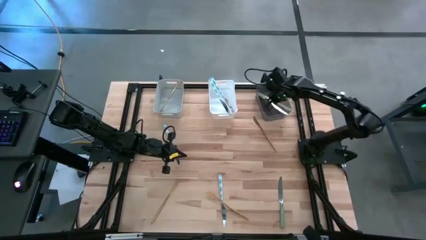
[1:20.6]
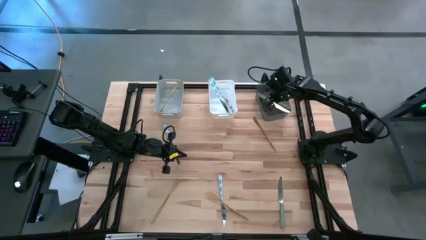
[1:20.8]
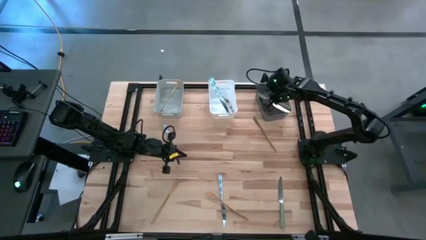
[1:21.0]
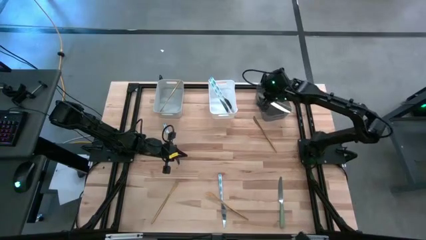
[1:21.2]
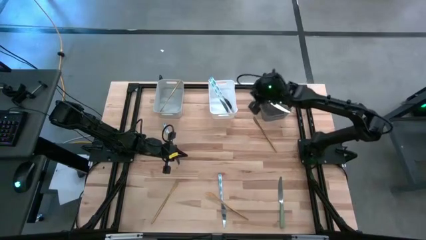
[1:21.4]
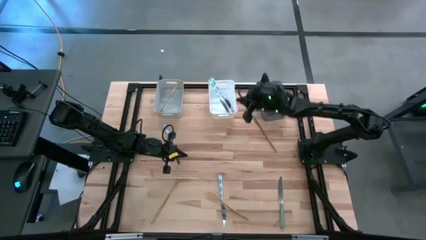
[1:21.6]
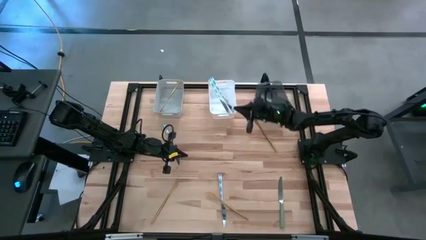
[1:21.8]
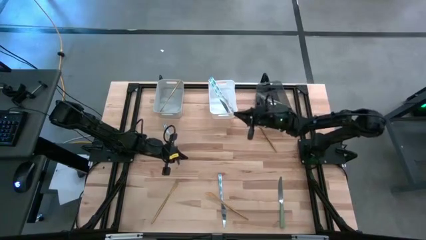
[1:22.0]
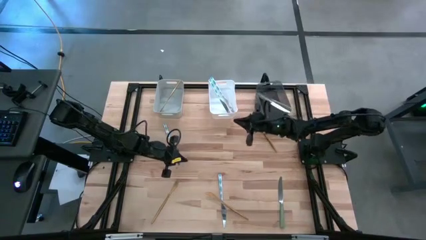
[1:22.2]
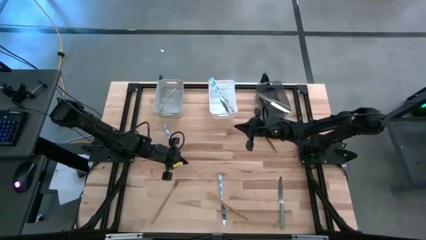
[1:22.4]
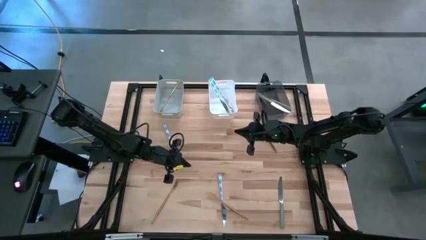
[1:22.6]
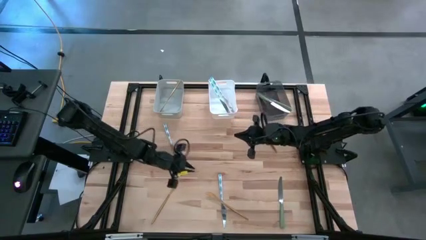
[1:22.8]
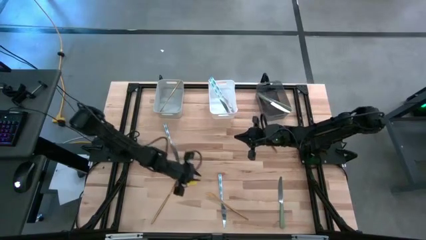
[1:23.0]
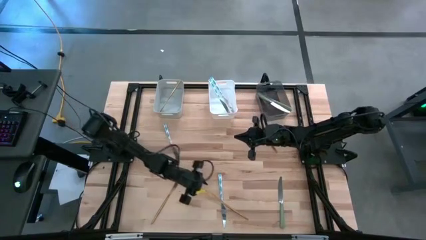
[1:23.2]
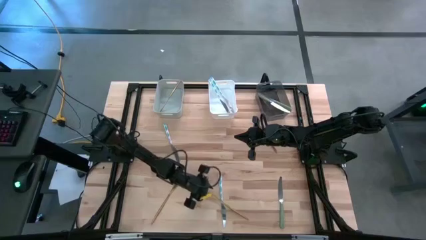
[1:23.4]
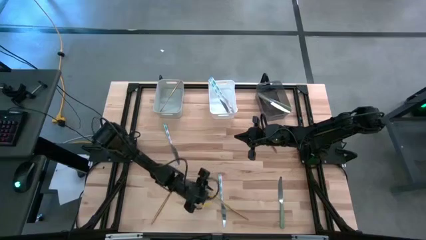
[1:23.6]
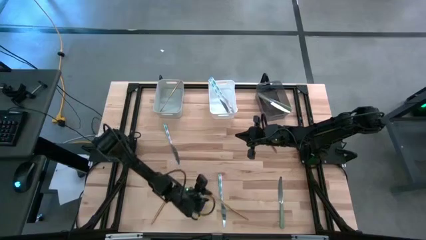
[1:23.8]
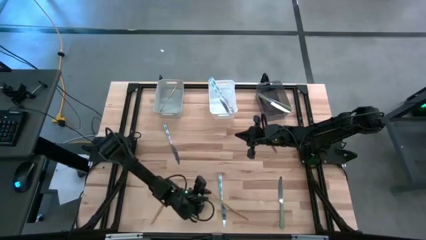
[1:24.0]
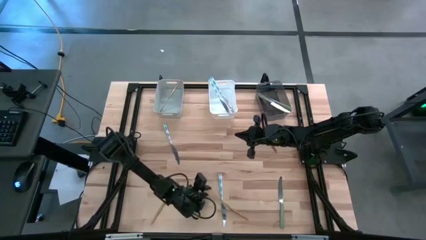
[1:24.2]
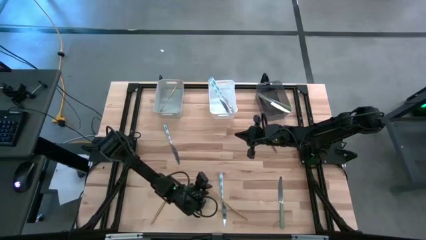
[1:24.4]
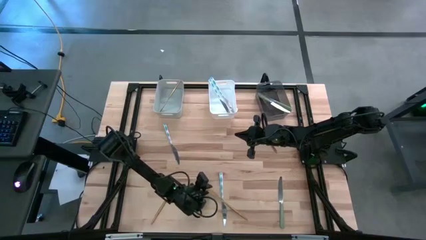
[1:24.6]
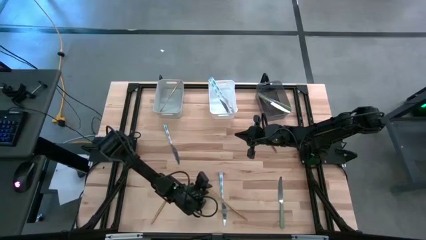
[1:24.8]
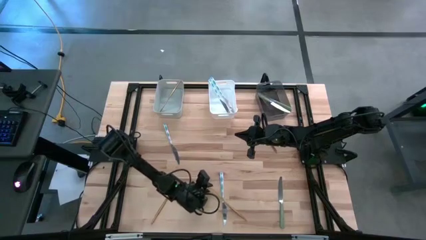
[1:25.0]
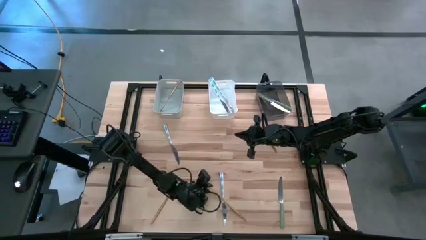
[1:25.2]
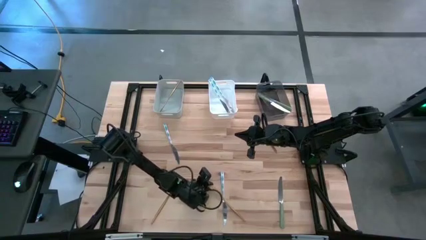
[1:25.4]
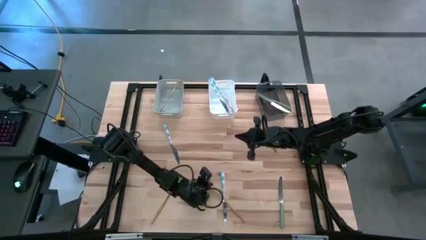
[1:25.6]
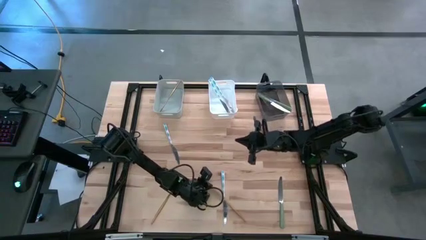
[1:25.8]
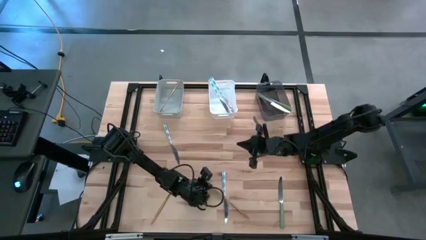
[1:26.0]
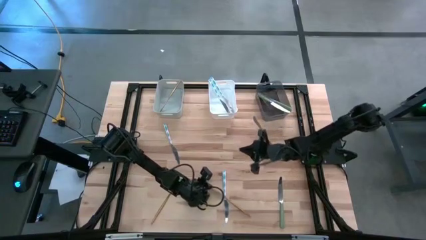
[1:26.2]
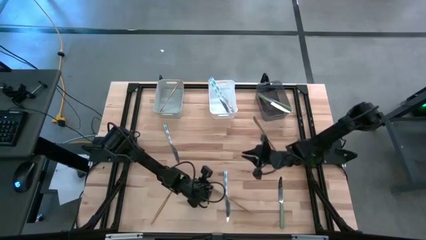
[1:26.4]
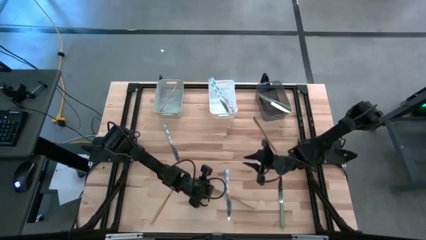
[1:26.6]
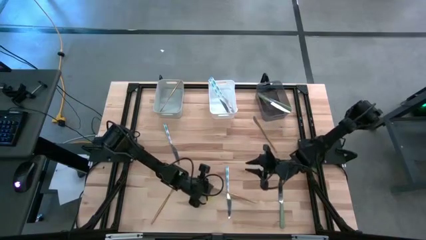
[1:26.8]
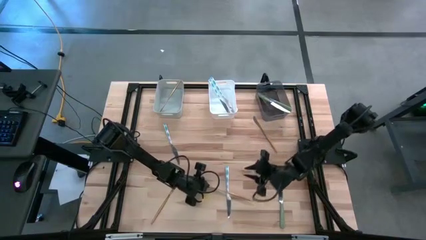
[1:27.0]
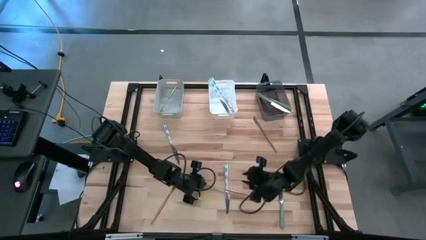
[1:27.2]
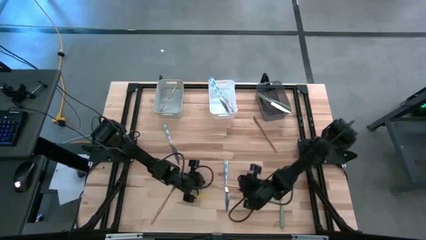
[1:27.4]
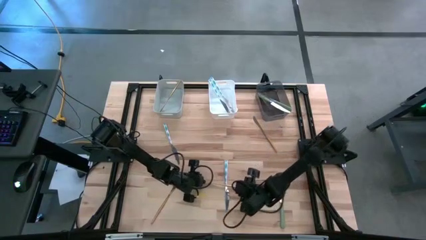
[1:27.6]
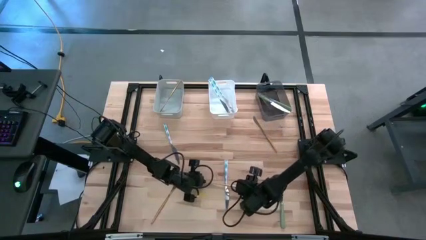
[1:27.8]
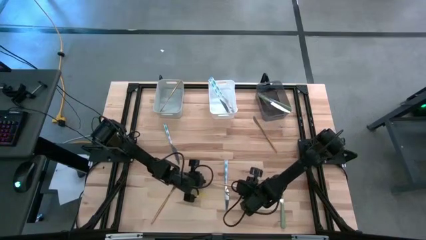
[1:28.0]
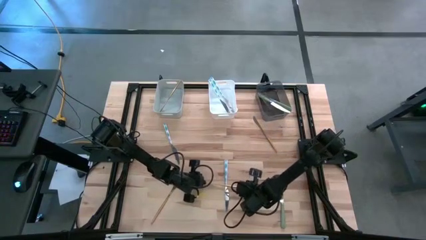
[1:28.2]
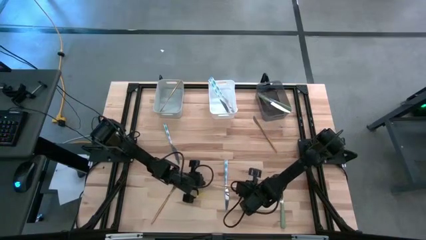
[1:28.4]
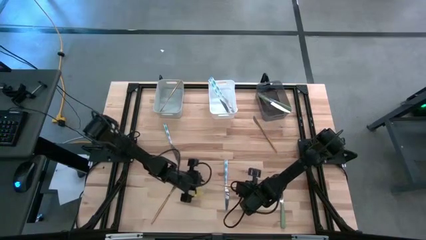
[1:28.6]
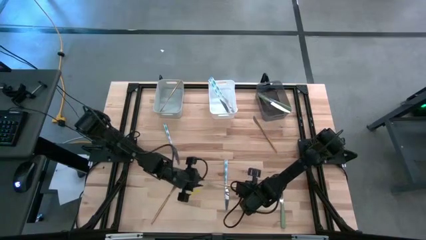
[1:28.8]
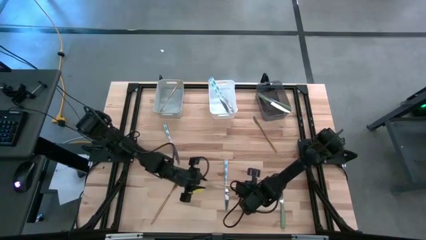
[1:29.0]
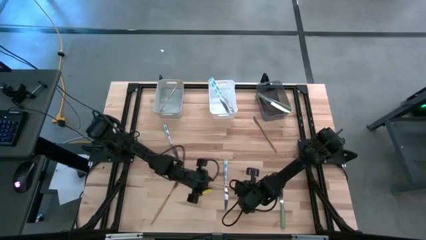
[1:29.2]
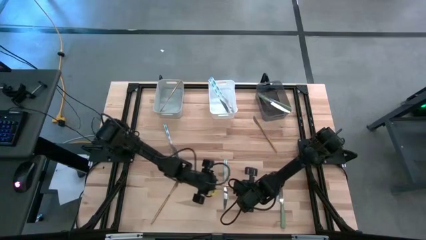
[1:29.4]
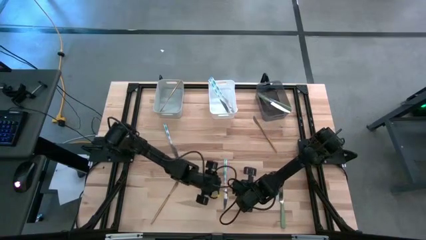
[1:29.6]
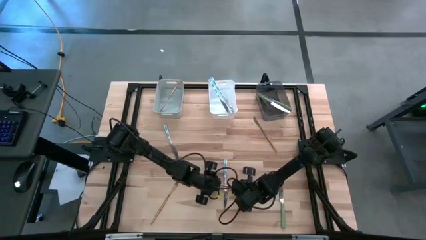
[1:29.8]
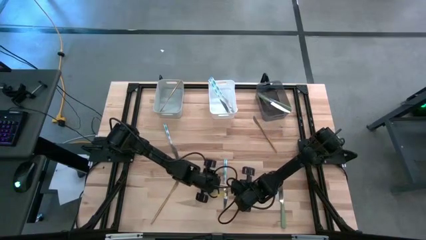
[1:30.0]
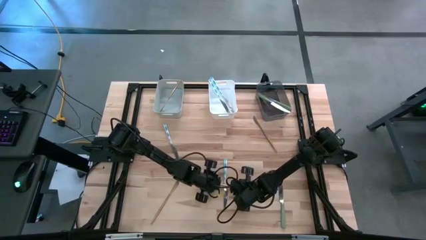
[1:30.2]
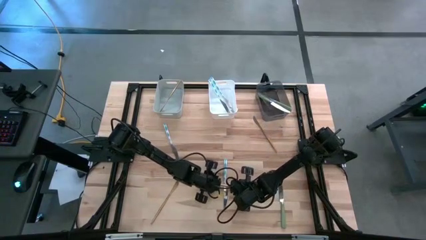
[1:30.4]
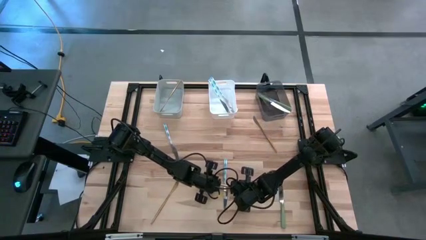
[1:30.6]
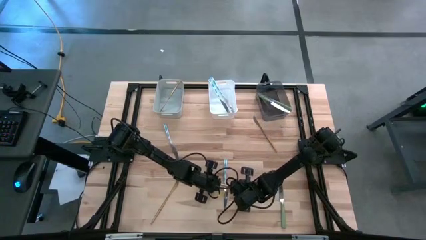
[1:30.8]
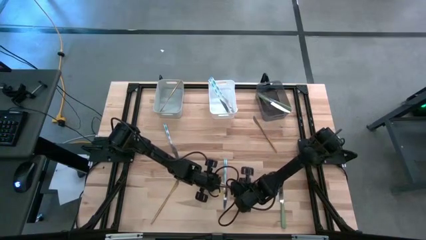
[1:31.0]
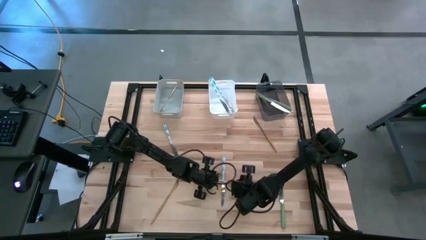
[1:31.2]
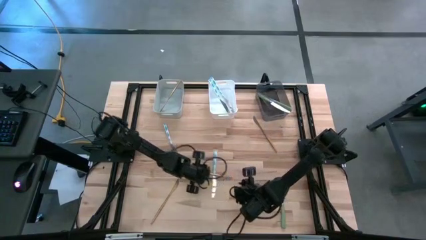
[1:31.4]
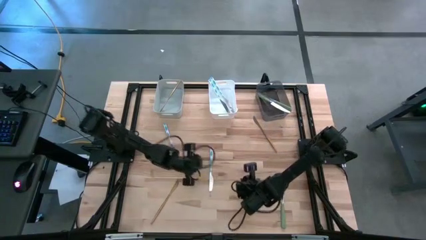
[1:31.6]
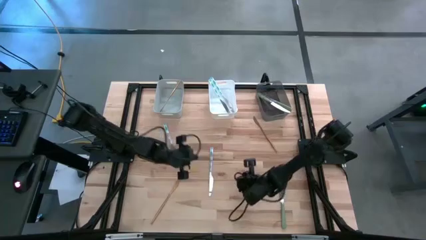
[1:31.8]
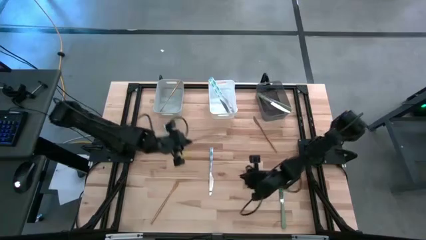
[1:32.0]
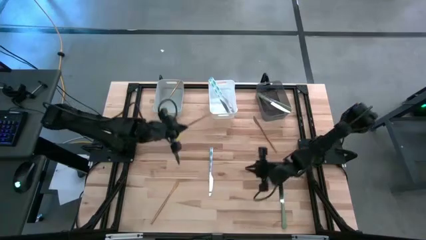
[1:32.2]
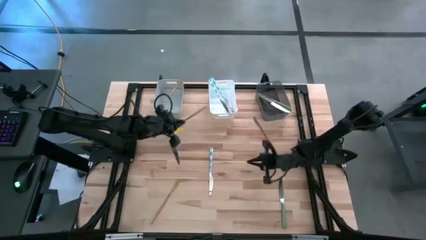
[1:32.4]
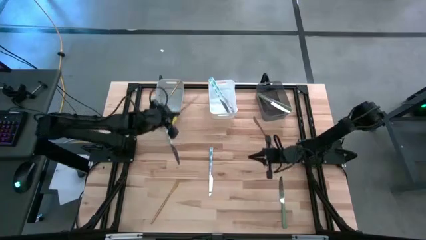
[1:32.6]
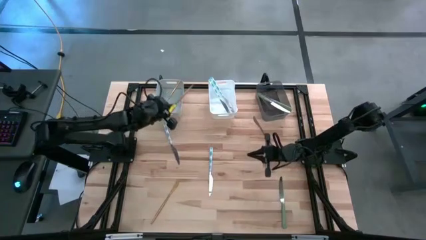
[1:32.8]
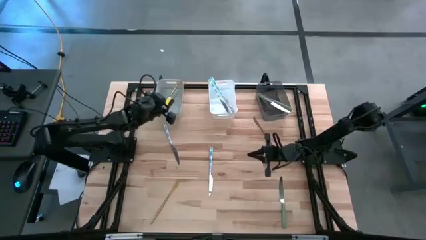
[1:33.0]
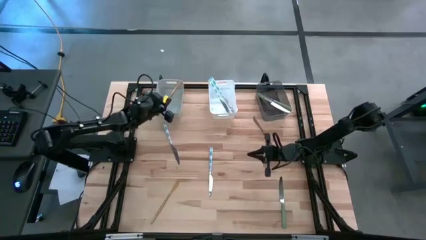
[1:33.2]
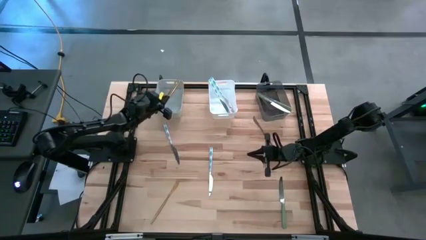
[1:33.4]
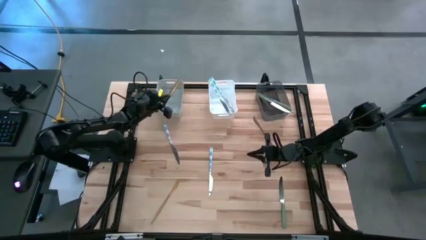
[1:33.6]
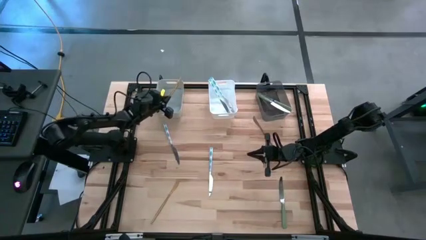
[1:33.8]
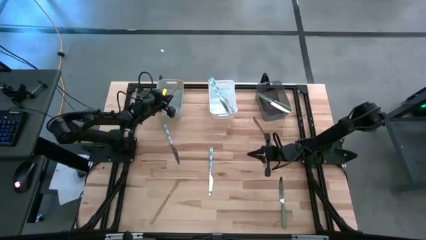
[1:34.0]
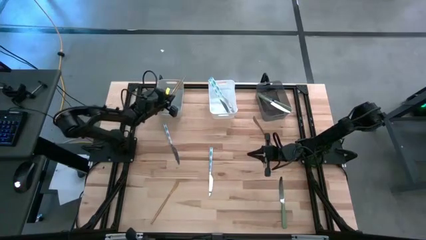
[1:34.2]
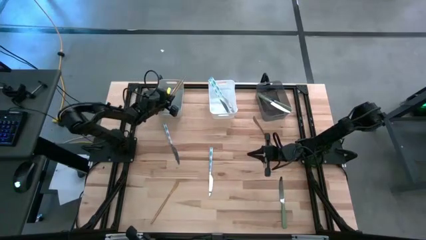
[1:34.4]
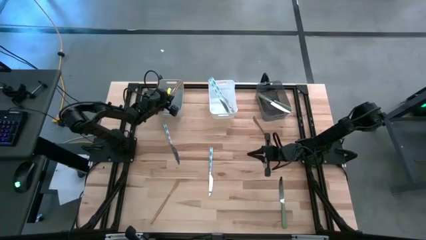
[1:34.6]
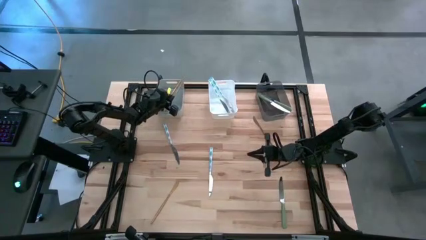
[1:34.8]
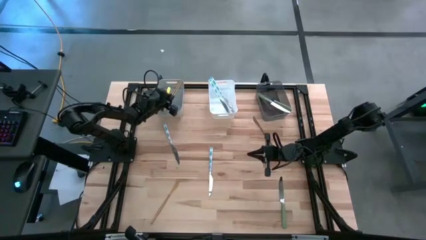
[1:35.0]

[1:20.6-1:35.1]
Task: Sort silverware by color (type)
Put the bottom right gold table knife into the gray bin
